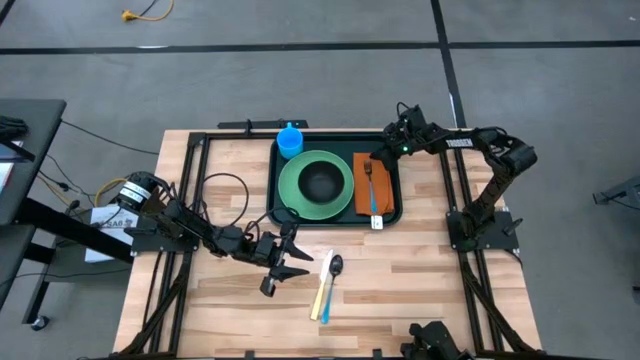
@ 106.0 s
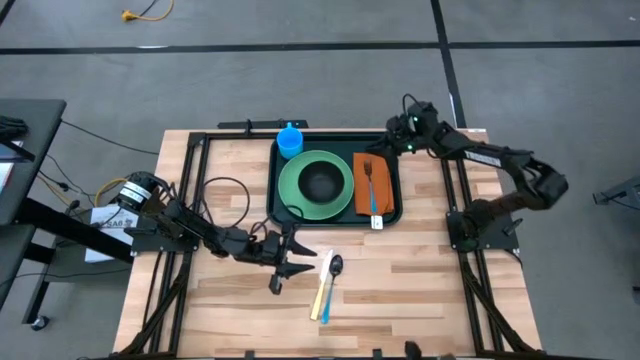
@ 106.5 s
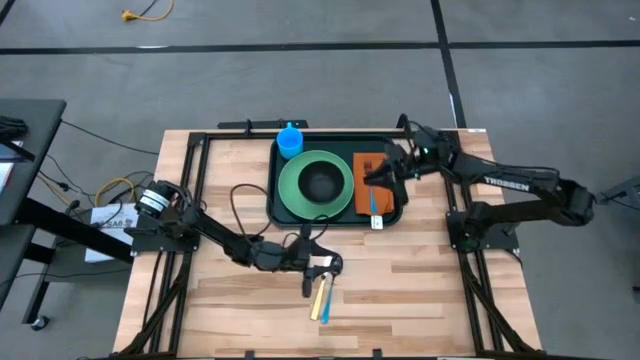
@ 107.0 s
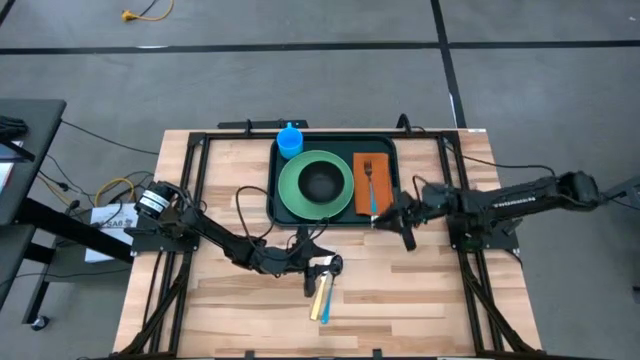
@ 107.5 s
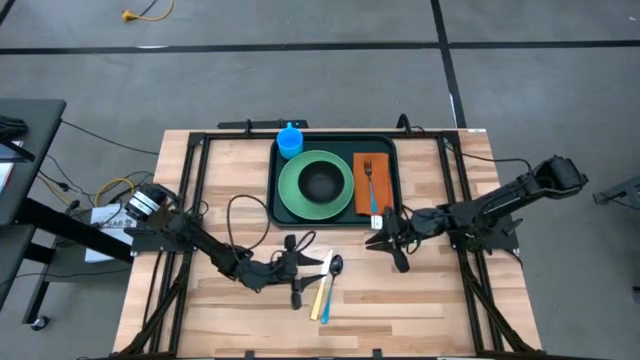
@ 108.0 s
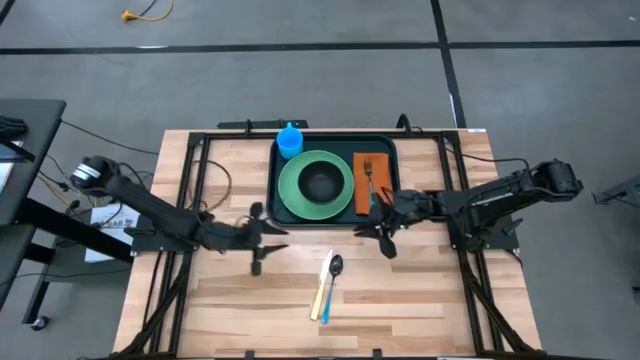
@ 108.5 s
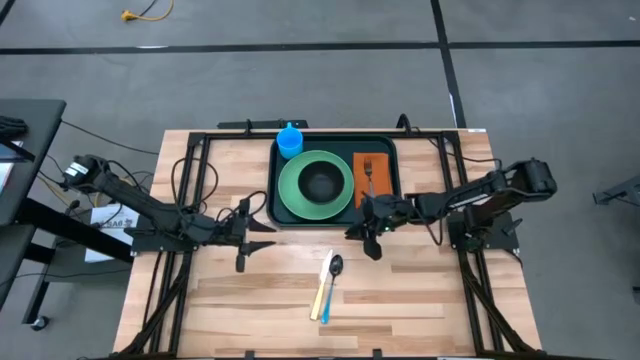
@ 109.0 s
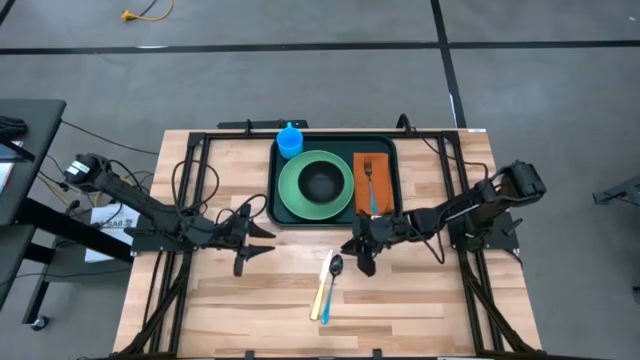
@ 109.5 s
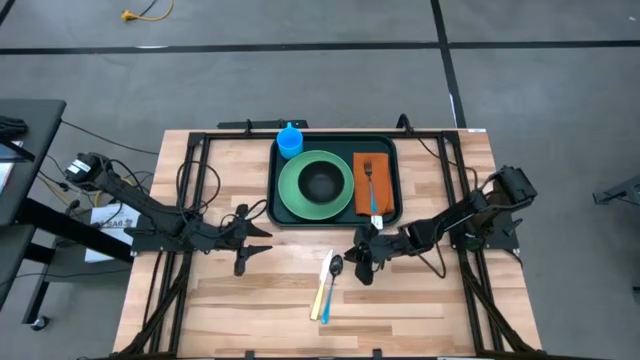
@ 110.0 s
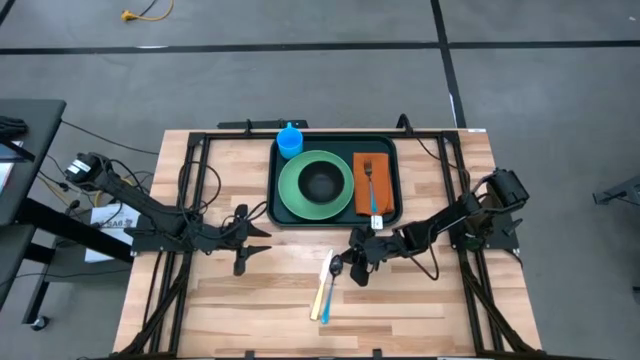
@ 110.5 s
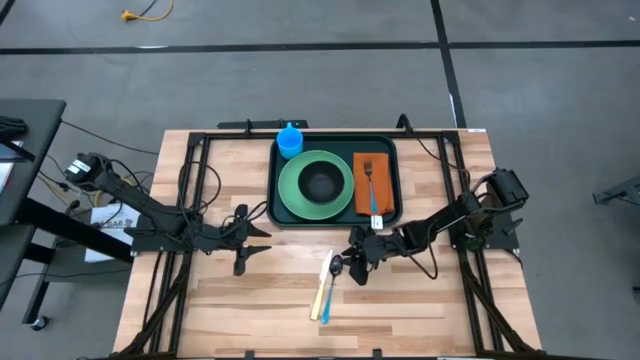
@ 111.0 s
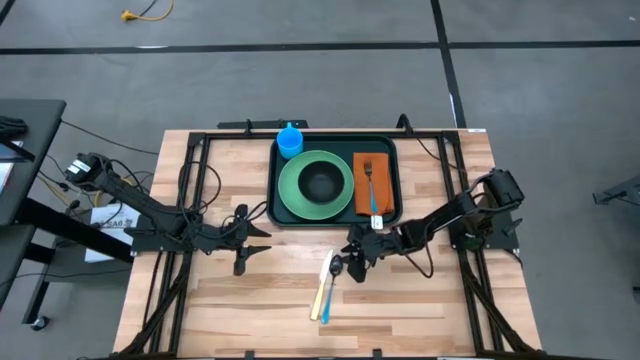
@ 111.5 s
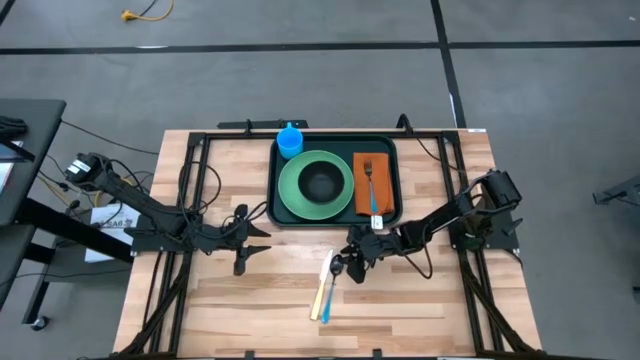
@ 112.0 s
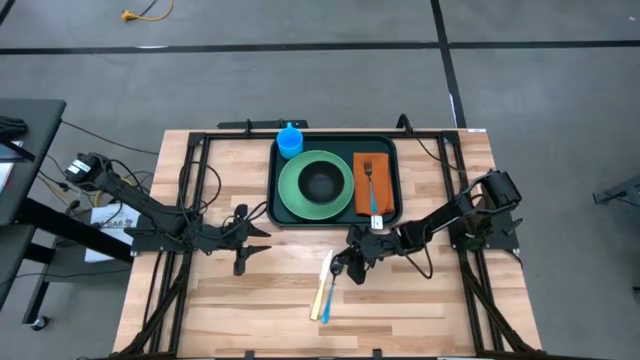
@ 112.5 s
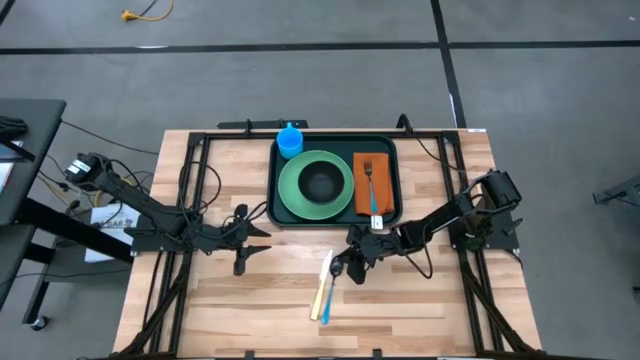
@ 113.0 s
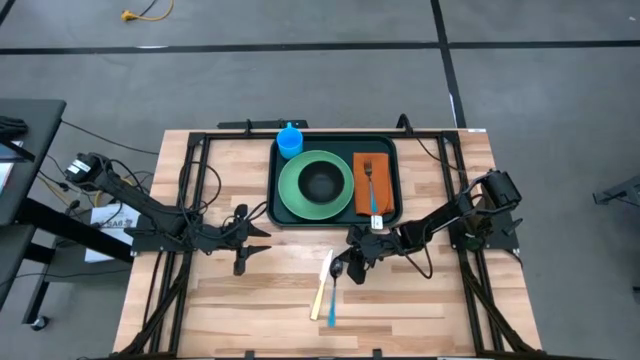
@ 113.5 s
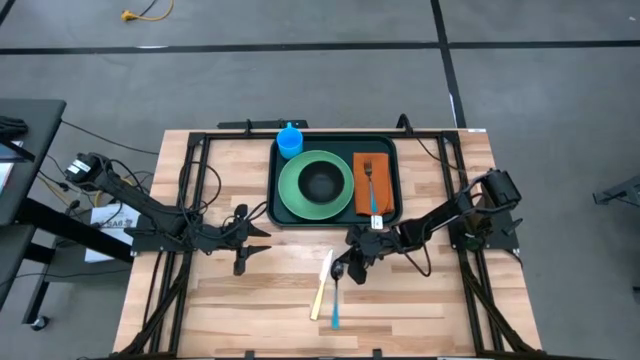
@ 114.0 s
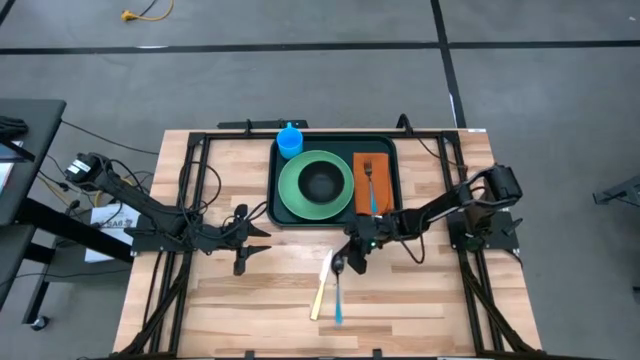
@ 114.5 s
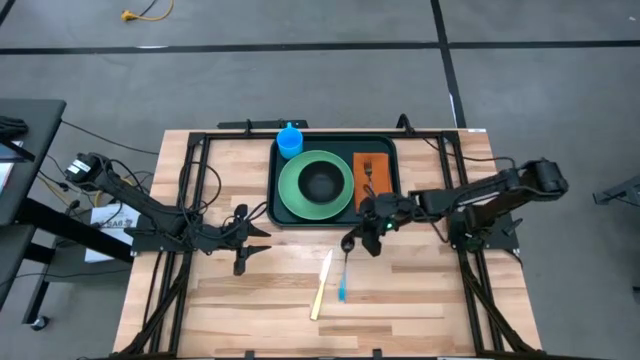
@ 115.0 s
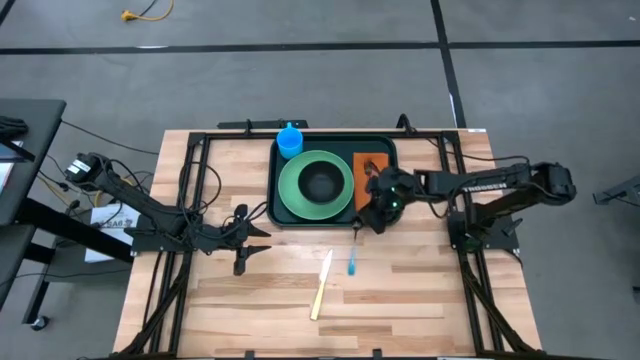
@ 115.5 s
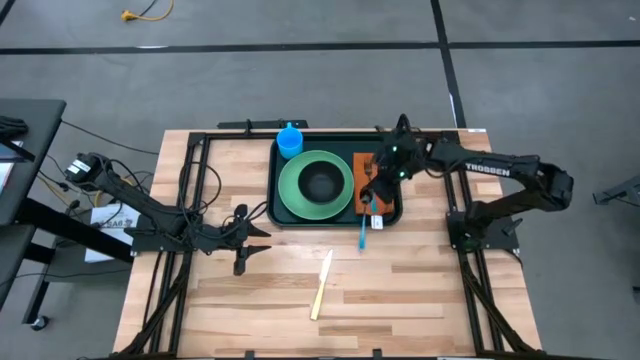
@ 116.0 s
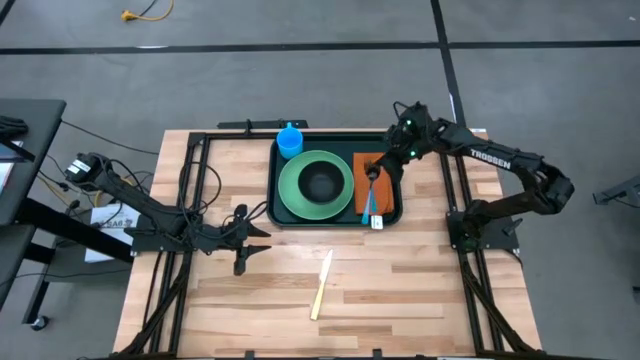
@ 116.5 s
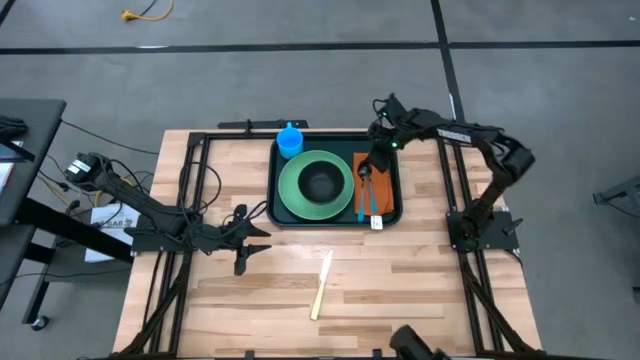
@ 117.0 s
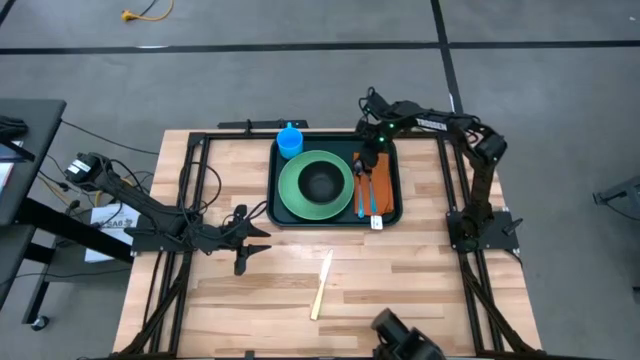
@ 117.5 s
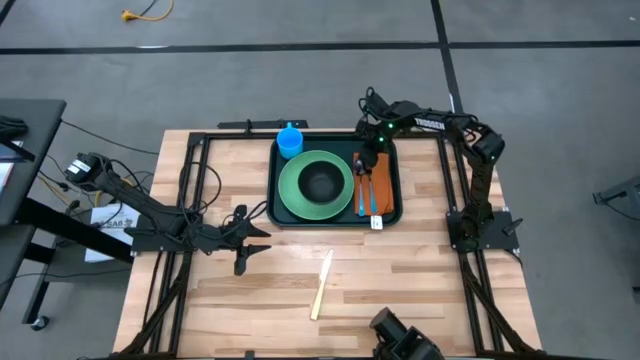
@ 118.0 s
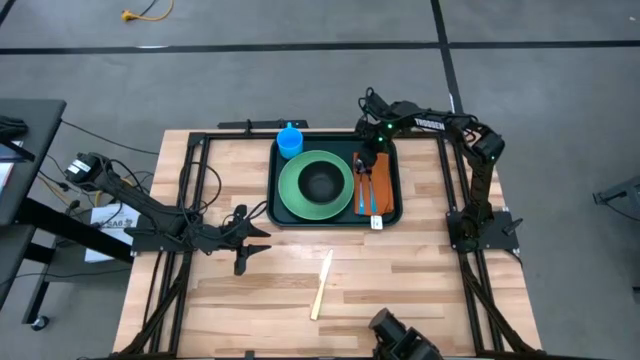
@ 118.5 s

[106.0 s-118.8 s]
Task: Set up tray
Put the blue spoon beside the blue fork on the brown table napkin on the black serving tray

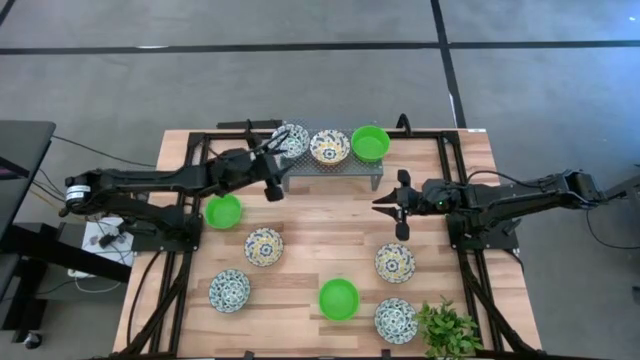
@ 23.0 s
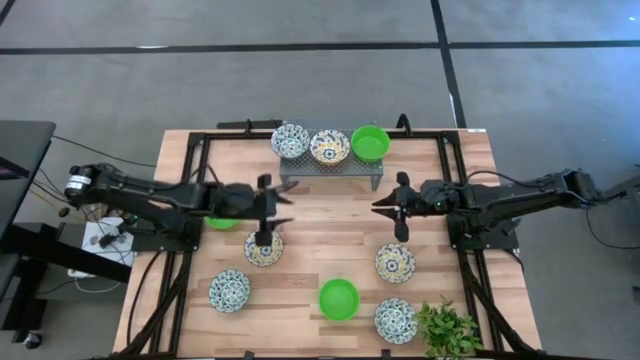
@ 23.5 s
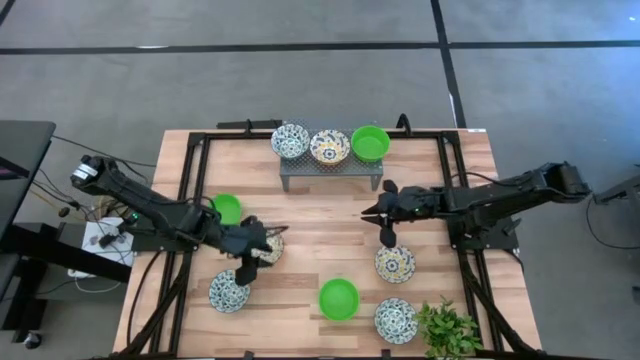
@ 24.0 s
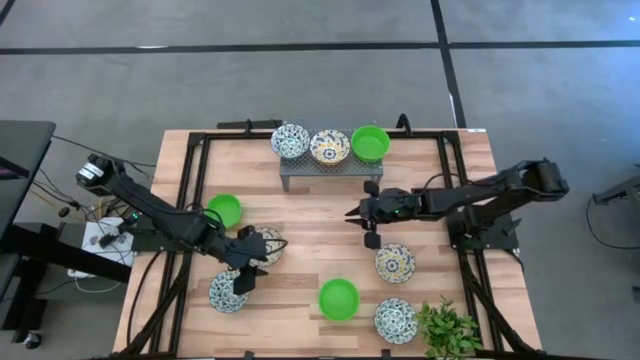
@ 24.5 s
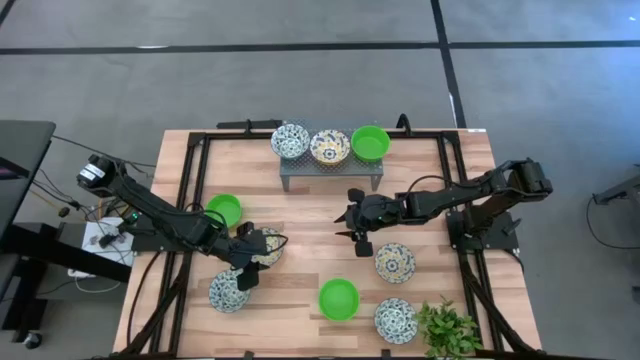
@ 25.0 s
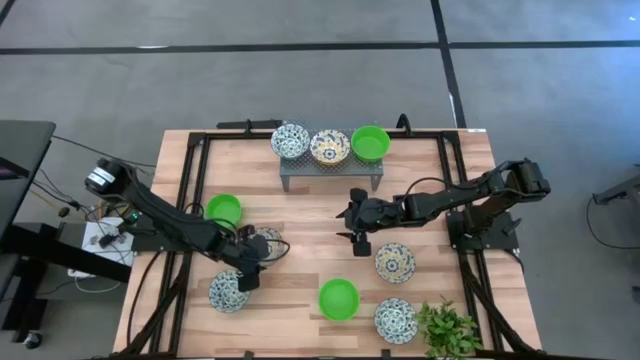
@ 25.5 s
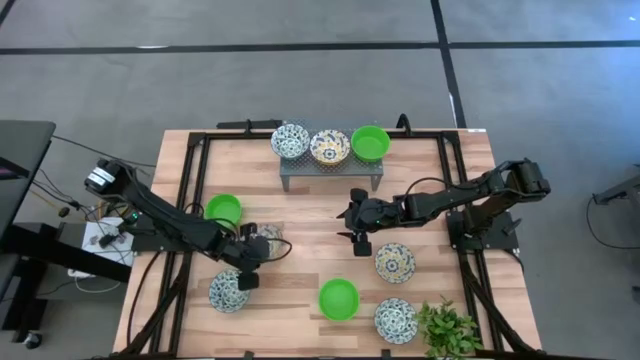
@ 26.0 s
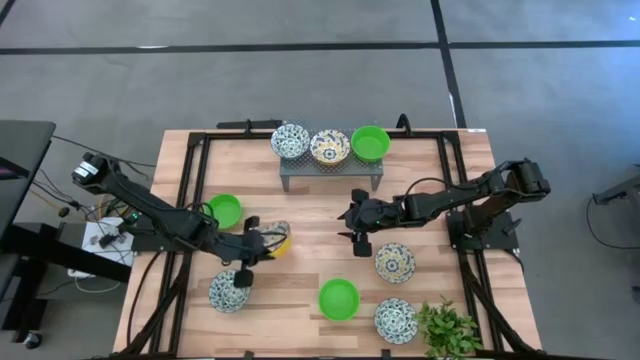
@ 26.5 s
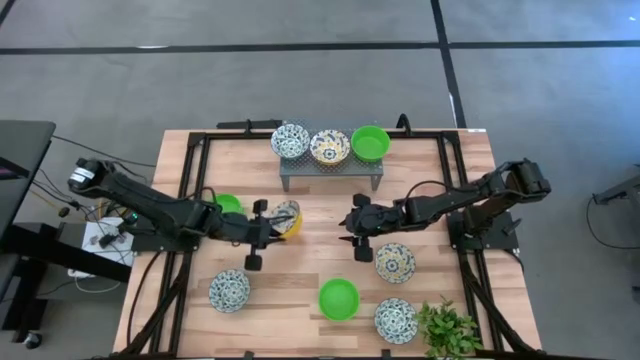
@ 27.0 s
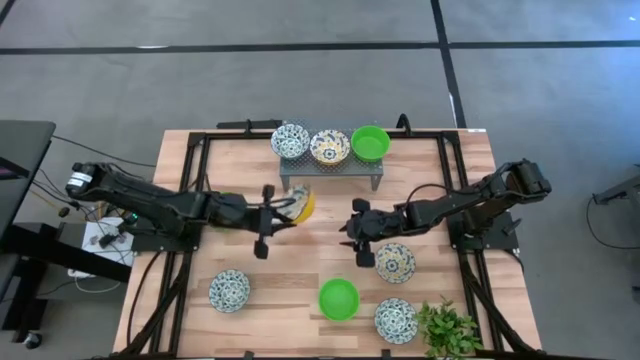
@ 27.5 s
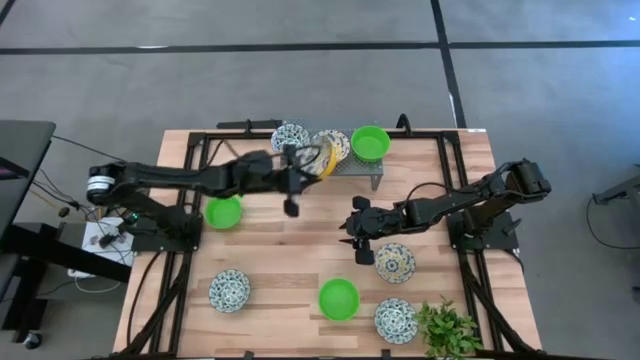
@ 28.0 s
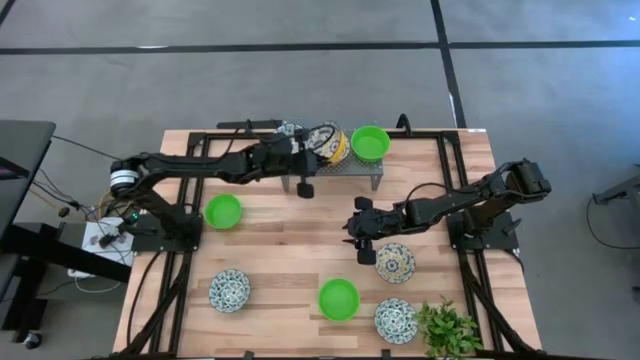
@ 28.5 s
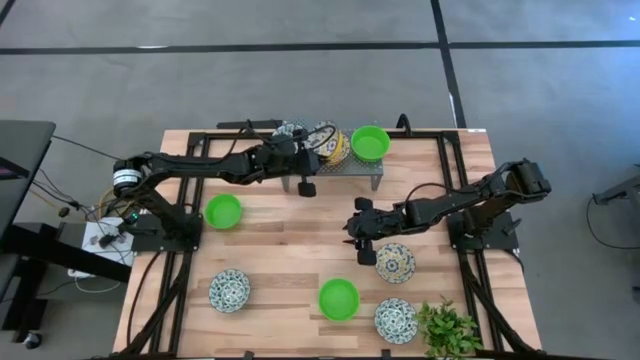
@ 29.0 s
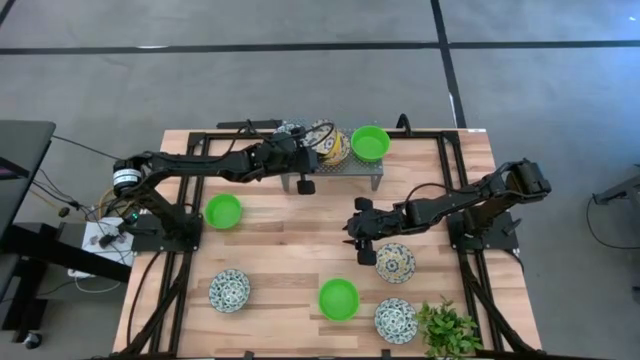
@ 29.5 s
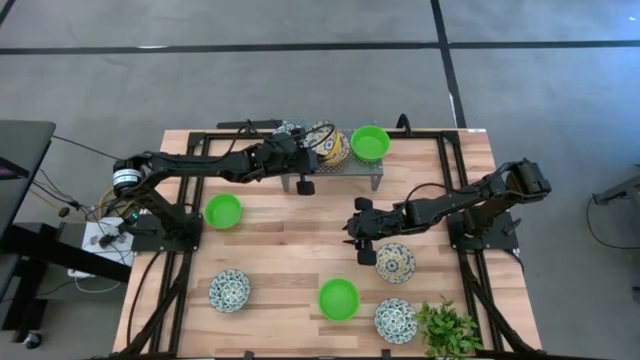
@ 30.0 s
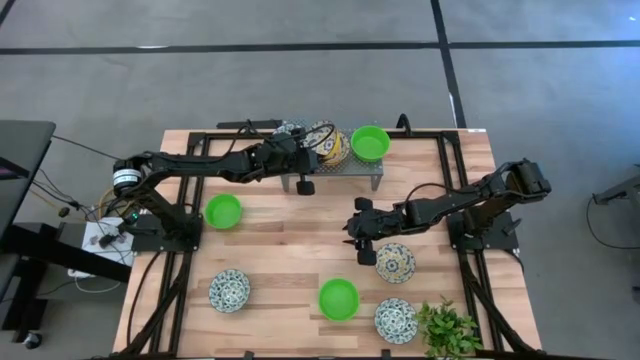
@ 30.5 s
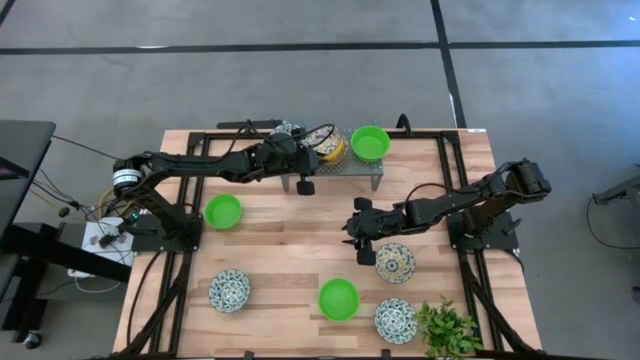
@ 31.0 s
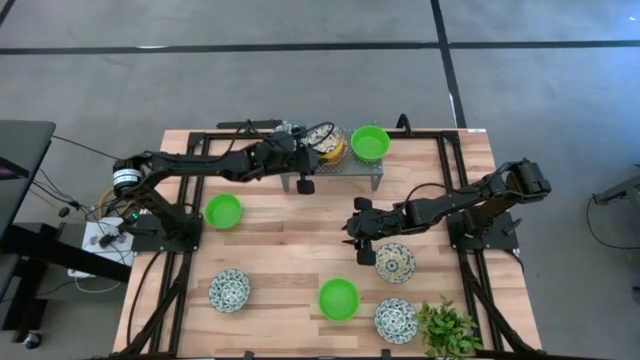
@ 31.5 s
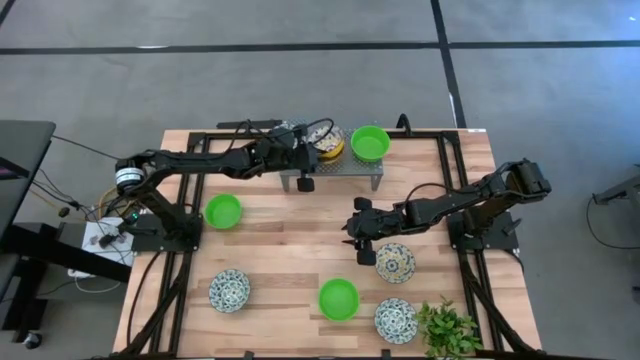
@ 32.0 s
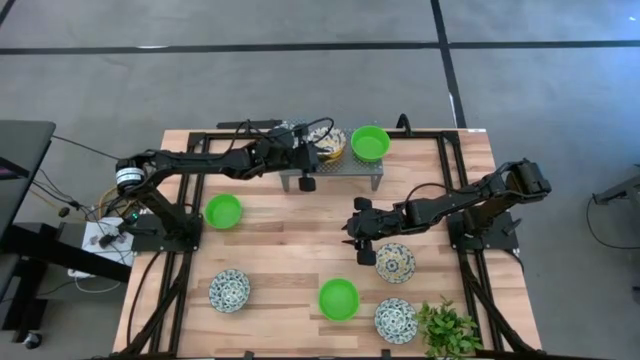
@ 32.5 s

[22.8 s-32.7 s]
Task: Pick & Place Mini bowls
Stack the left yellow patterned bowl on the yellow patterned bowl on the shelf
